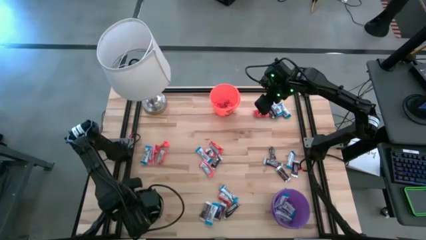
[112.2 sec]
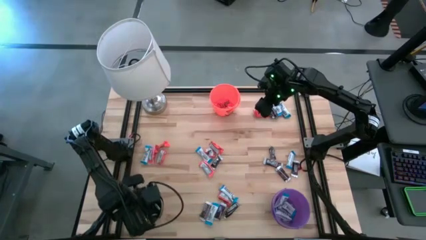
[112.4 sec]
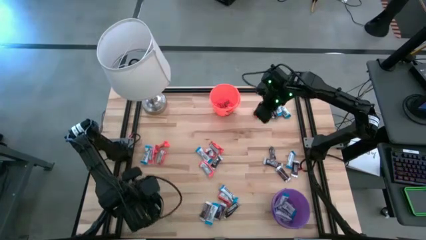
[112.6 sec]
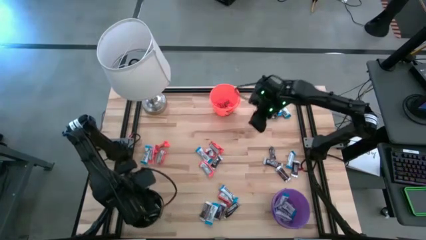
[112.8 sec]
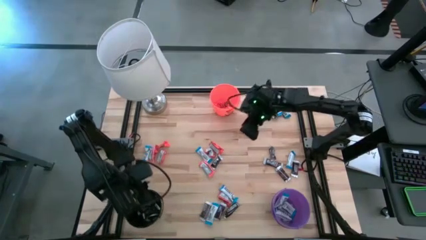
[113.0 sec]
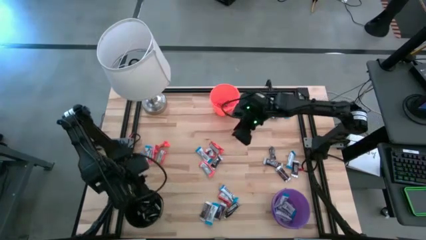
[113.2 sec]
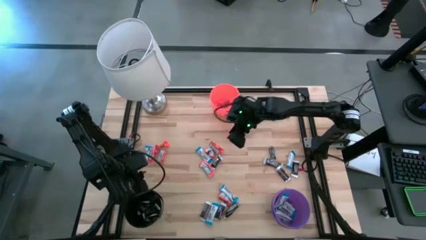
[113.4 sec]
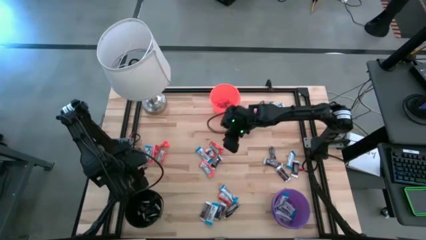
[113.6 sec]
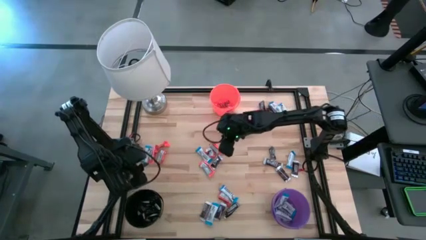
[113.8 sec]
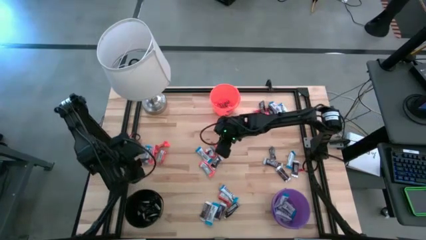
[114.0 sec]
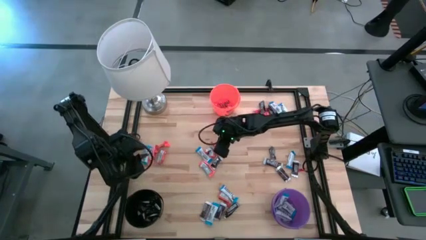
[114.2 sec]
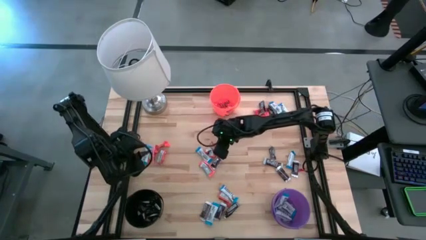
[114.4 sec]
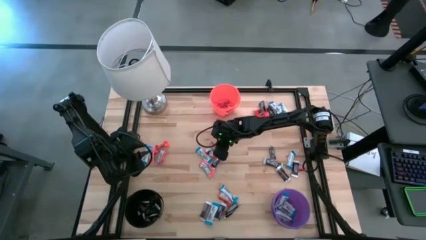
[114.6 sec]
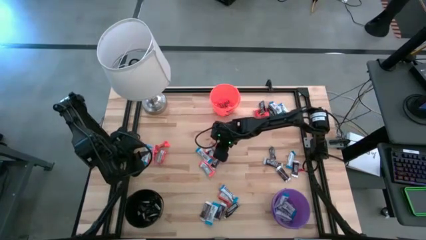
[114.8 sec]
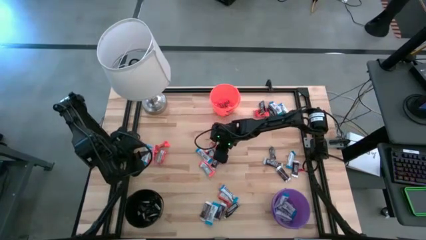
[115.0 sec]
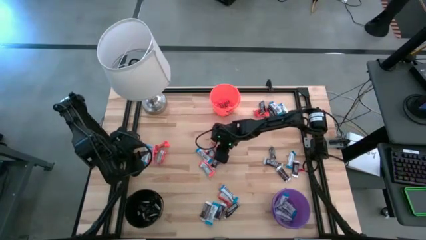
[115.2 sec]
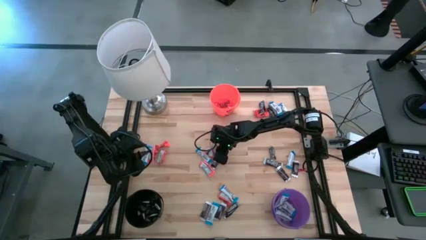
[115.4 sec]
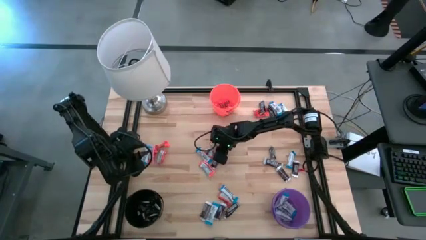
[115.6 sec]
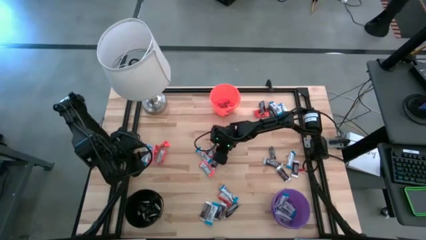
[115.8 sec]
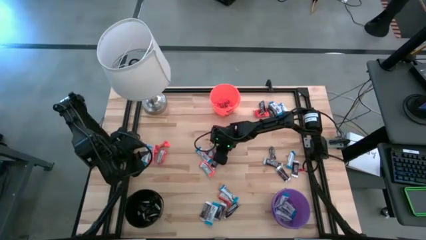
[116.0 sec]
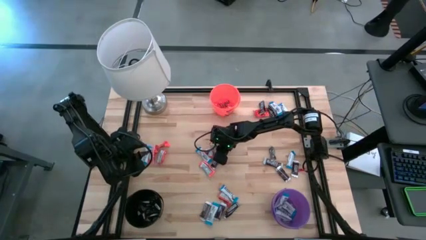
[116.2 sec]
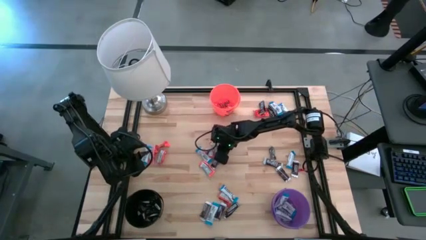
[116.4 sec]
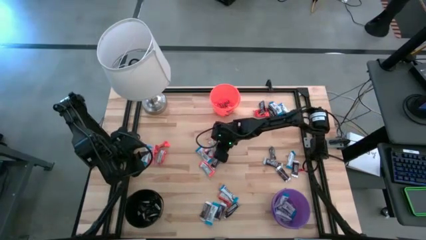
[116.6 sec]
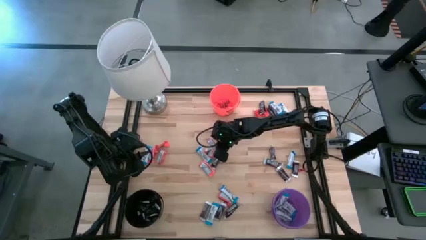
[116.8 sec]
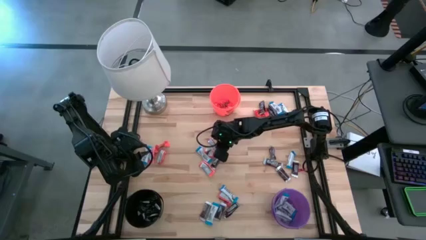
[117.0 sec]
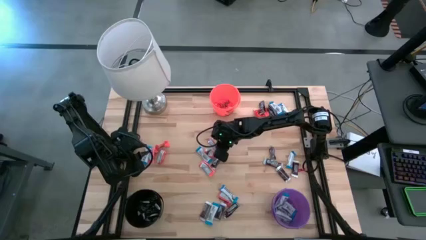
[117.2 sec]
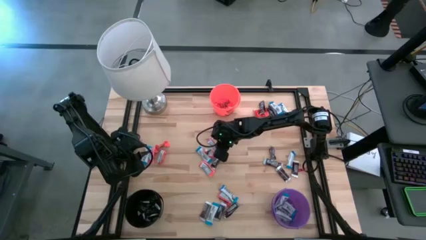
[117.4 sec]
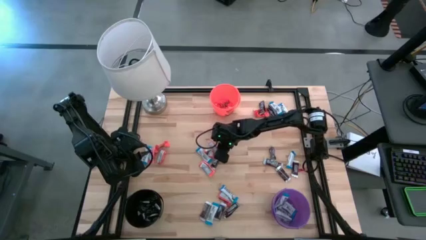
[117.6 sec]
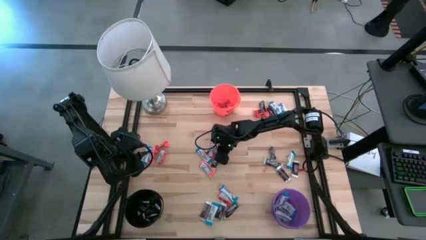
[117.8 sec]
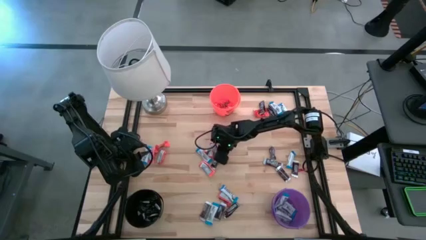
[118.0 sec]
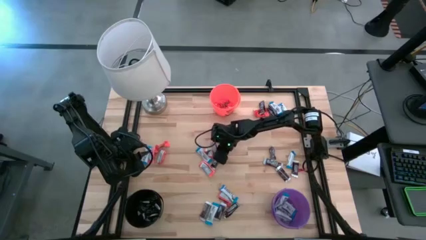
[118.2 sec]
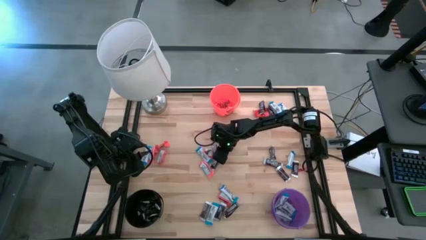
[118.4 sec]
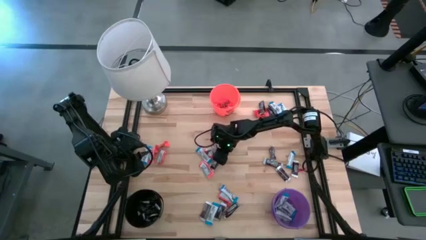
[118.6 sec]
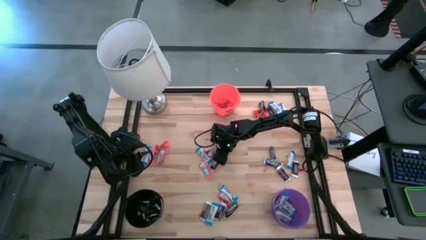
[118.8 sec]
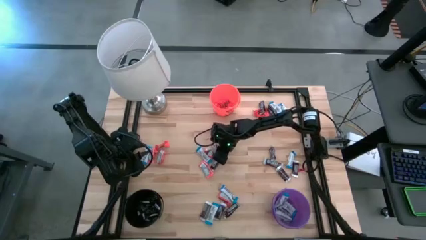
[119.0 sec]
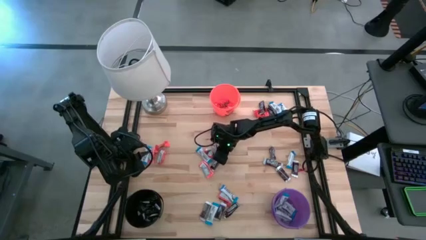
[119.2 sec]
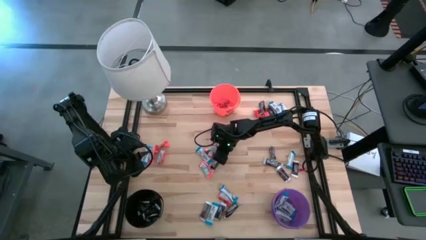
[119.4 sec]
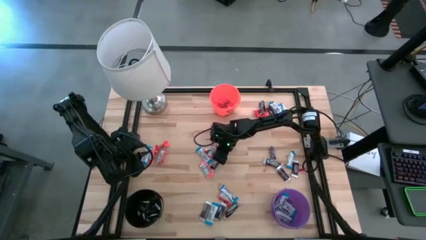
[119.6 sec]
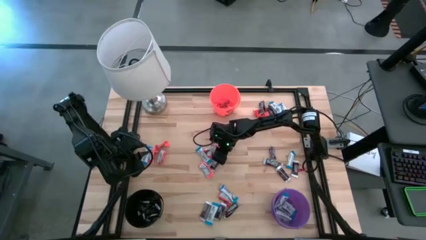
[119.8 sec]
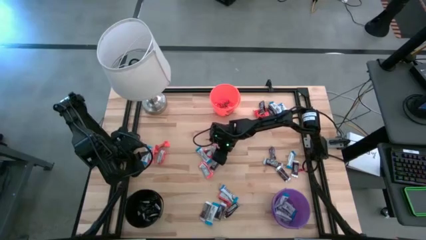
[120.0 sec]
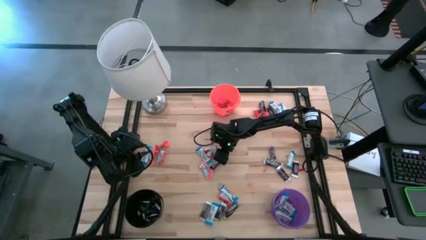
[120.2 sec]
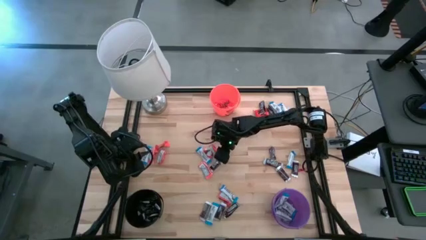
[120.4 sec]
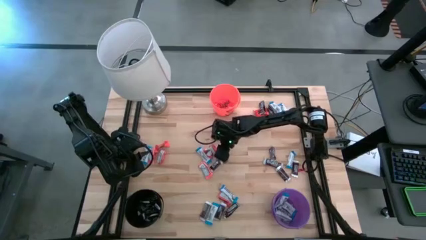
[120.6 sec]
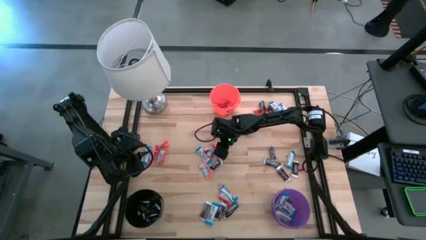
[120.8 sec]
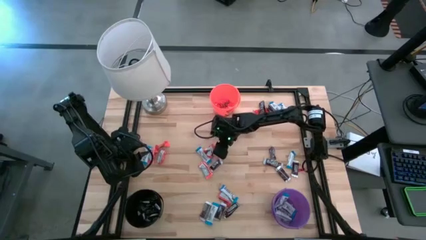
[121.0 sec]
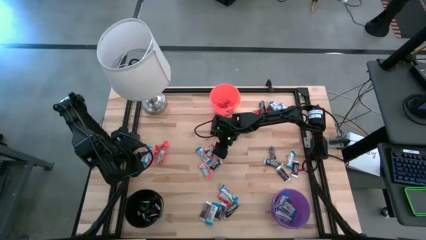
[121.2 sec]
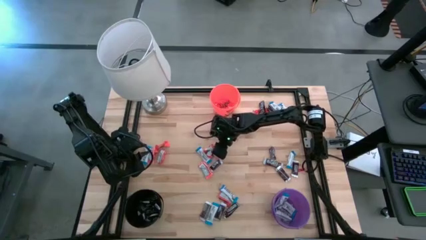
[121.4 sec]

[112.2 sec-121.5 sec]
Task: Organize candy in baskets
Put the orange chocolate into the orange bucket

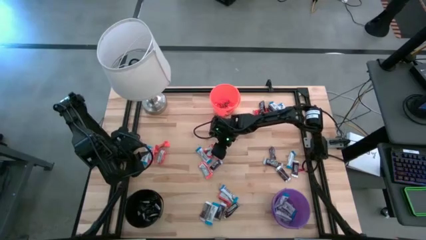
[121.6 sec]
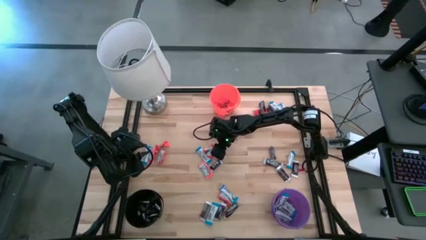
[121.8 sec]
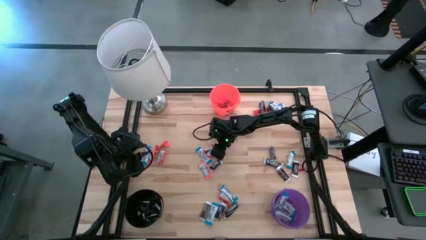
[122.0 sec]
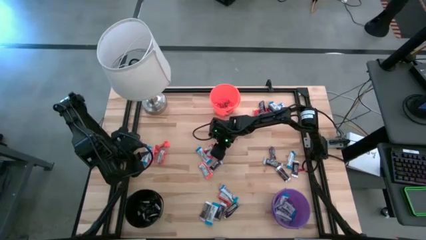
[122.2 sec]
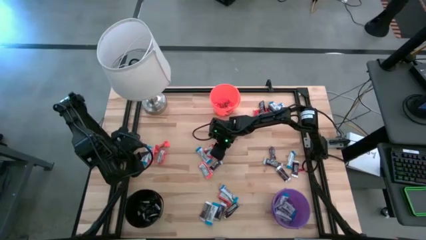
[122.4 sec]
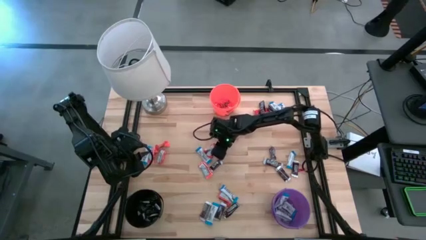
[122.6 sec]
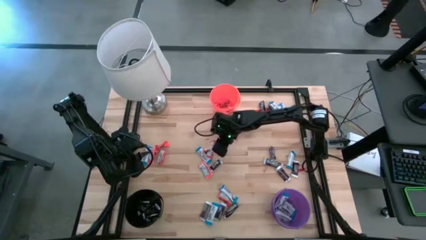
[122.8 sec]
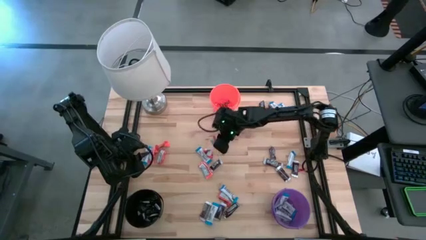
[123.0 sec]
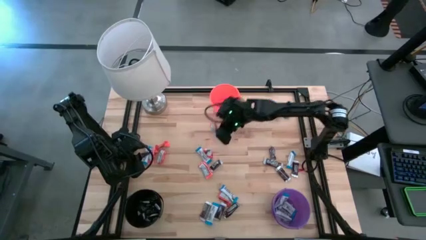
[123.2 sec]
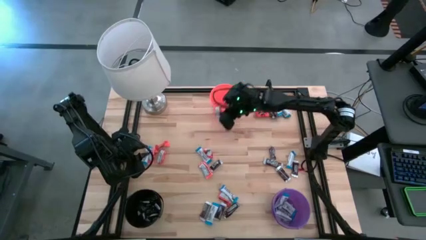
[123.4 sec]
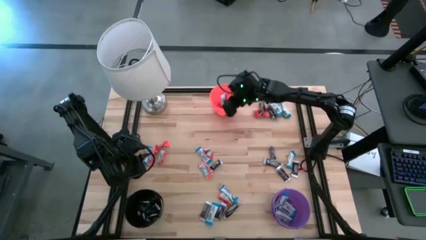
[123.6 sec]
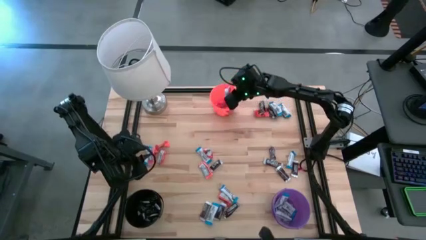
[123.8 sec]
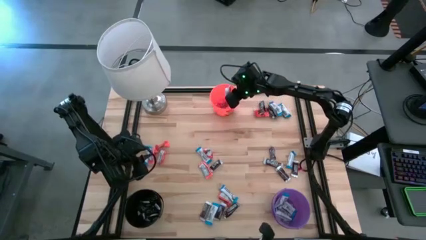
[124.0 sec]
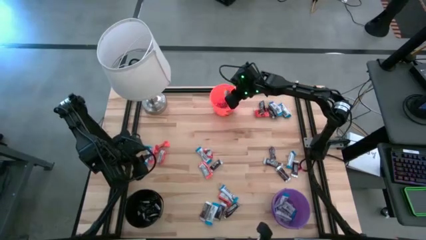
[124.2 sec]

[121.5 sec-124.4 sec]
Put the orange chocolate into the orange bucket

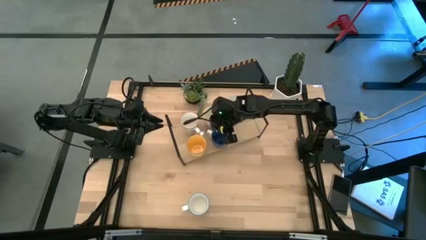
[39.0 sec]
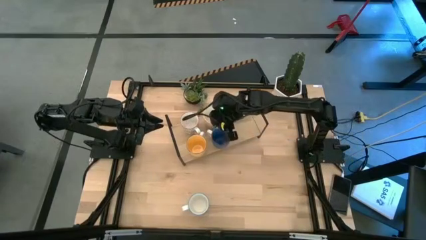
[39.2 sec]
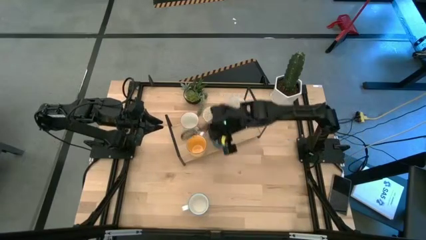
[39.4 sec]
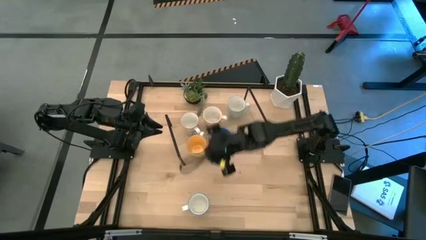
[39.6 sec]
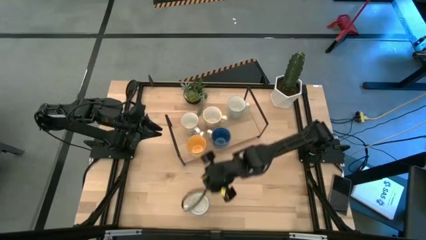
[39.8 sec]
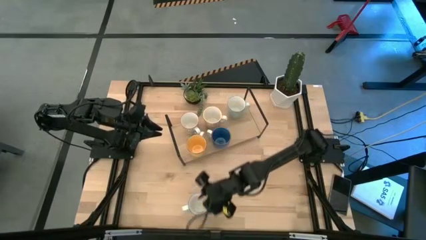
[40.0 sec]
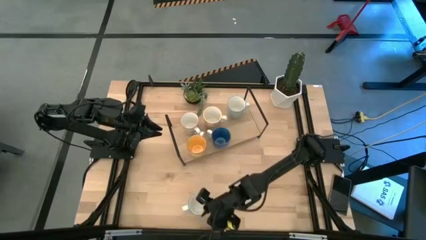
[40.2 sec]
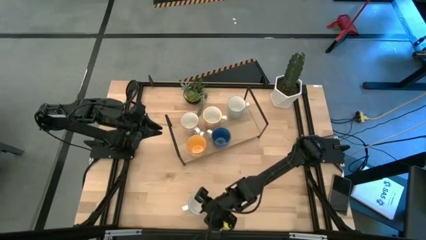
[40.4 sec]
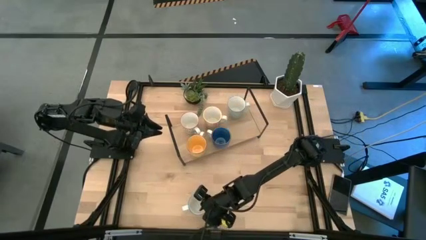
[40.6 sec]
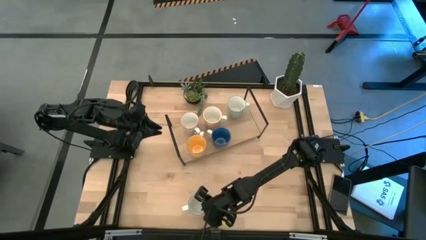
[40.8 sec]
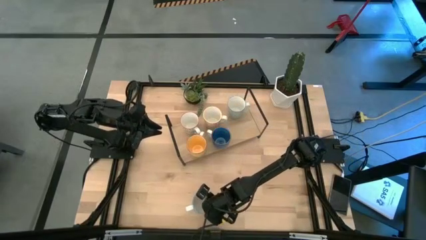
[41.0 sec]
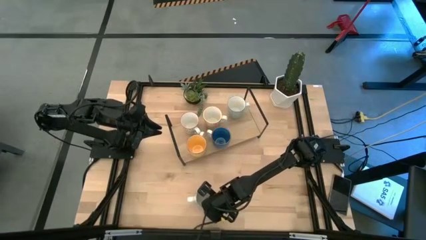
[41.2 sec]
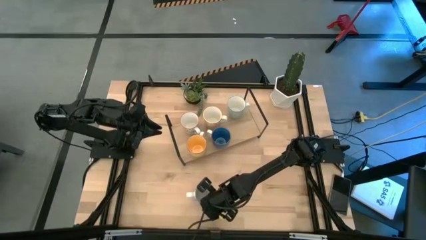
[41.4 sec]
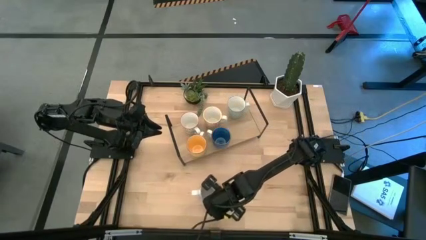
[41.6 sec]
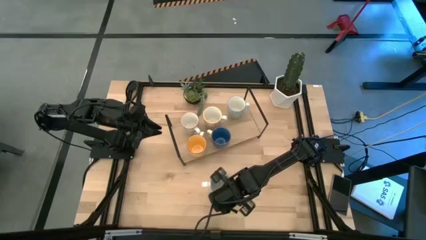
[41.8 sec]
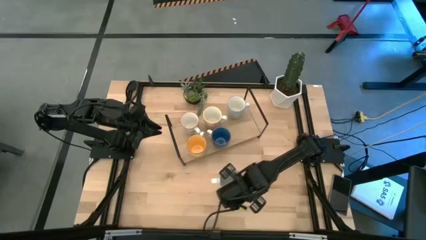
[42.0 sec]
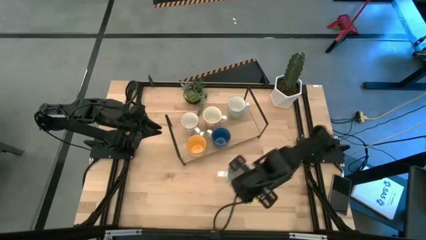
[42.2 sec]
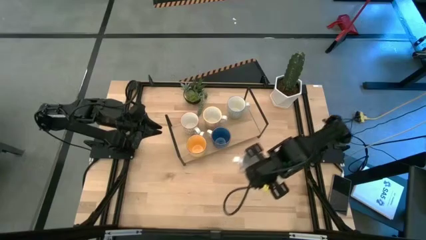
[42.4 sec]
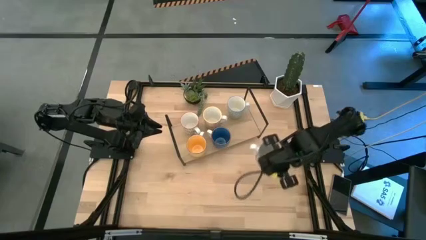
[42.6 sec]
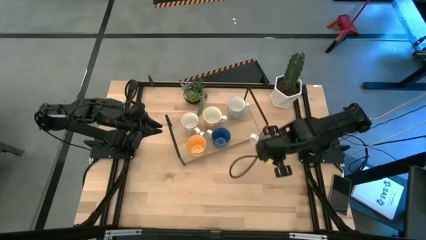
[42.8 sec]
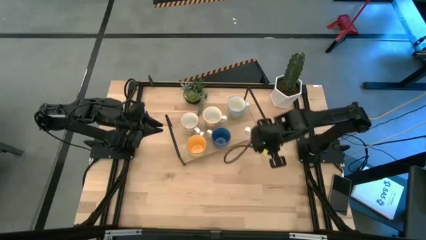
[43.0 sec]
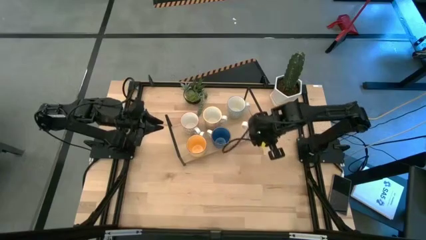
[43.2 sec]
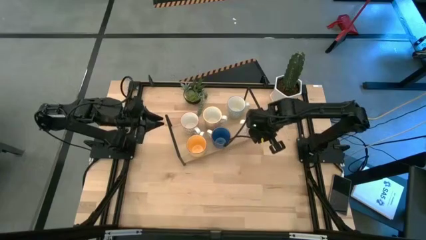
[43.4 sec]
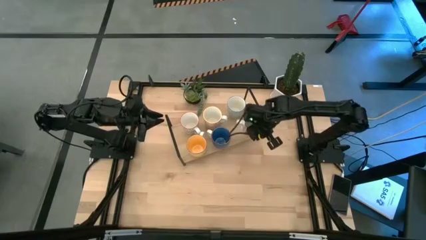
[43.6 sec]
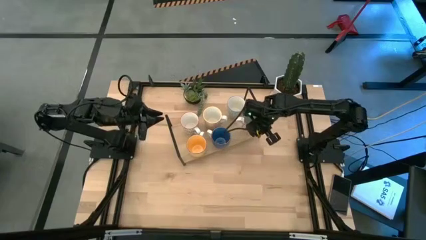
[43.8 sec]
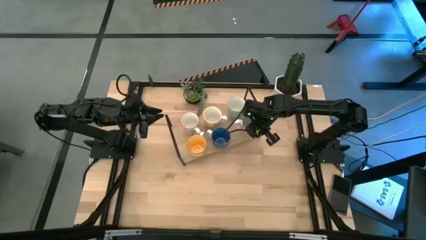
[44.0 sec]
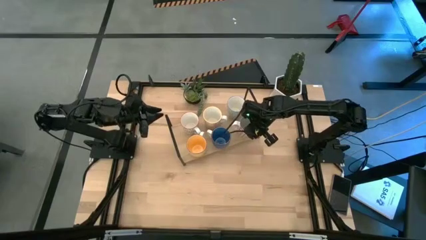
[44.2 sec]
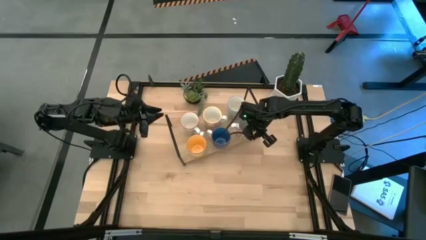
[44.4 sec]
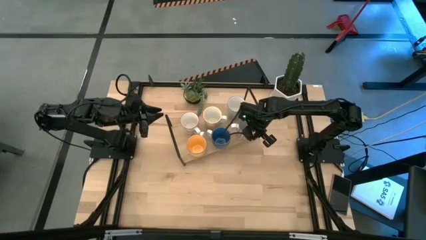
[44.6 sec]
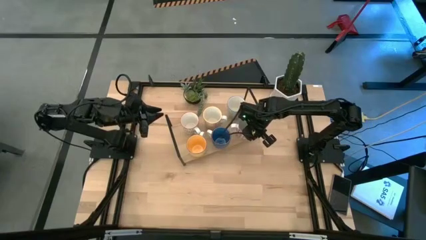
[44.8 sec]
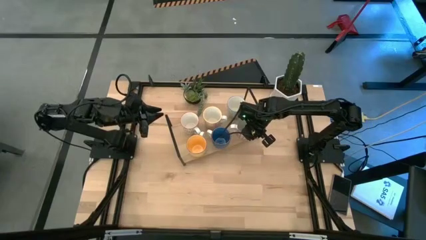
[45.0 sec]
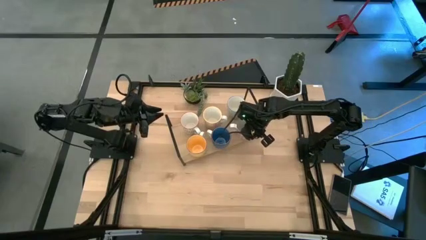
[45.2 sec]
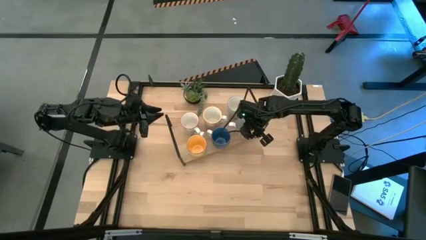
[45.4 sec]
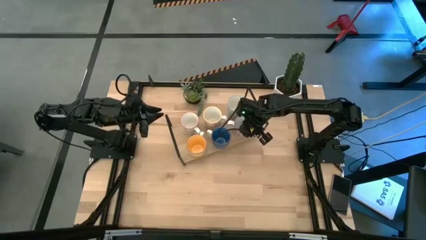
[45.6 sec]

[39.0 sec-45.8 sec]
Task: Place coffee mugs
Put the red patterned mug on the shelf
